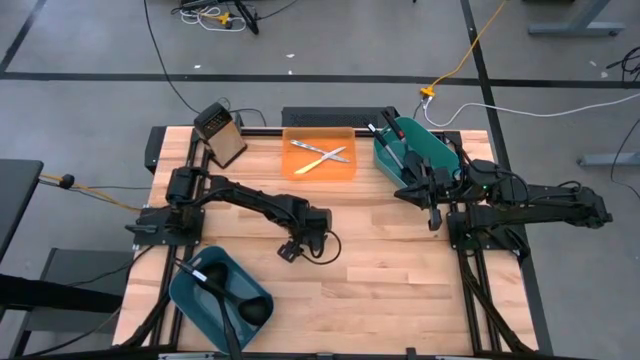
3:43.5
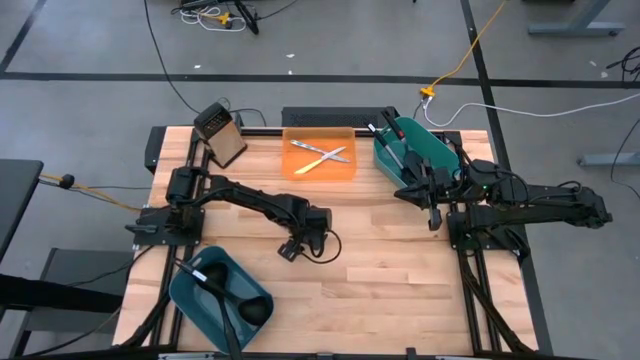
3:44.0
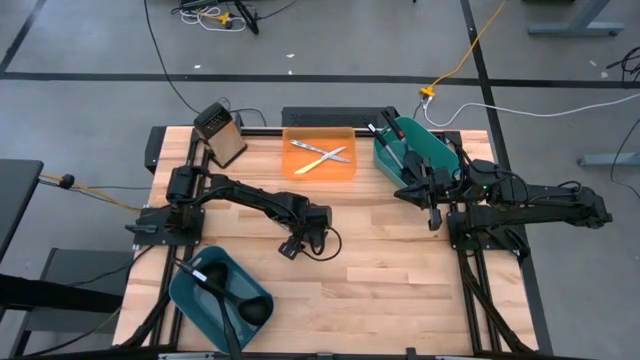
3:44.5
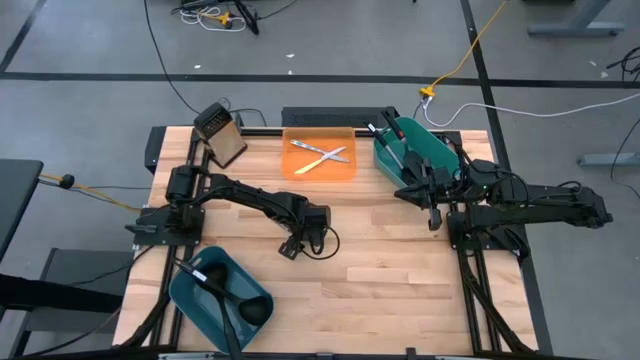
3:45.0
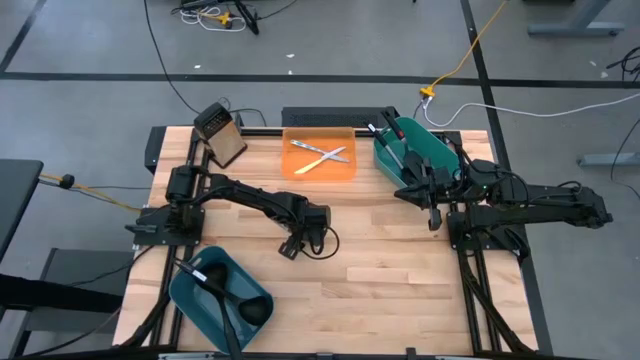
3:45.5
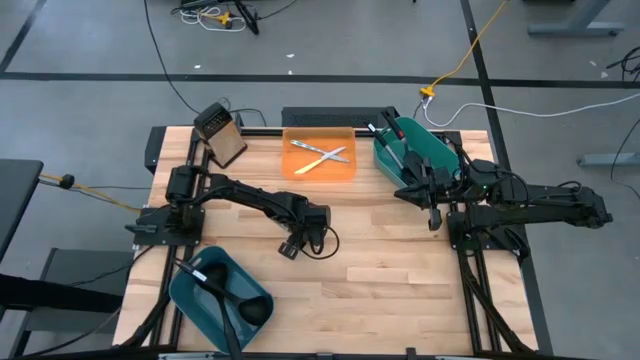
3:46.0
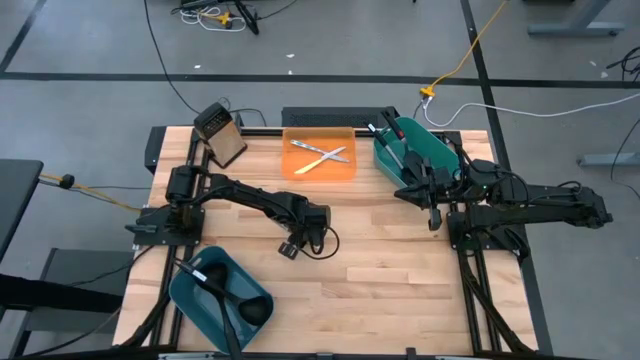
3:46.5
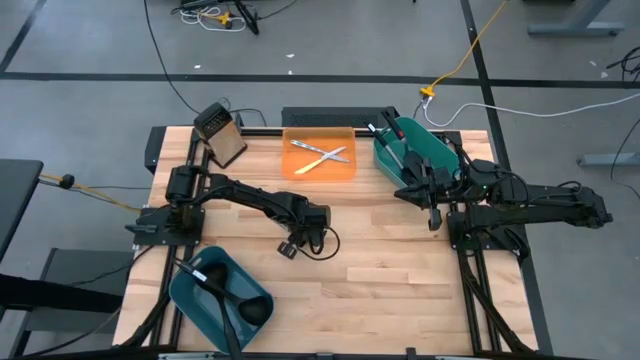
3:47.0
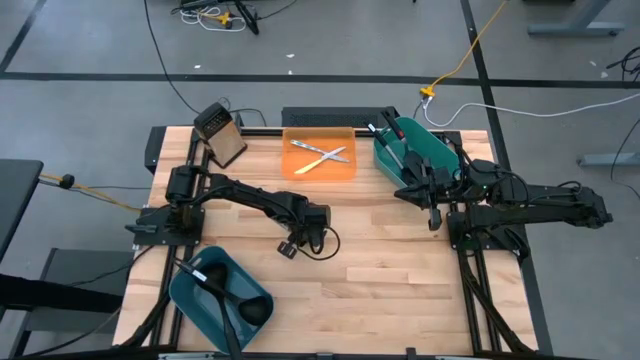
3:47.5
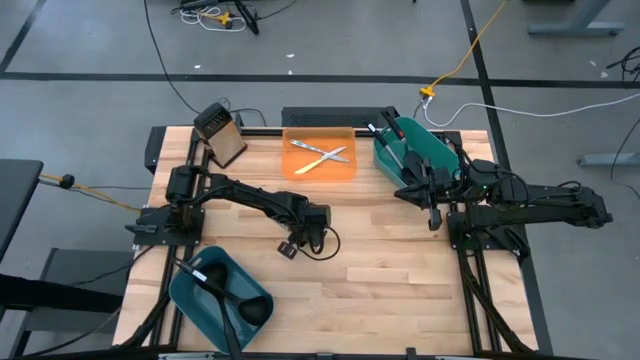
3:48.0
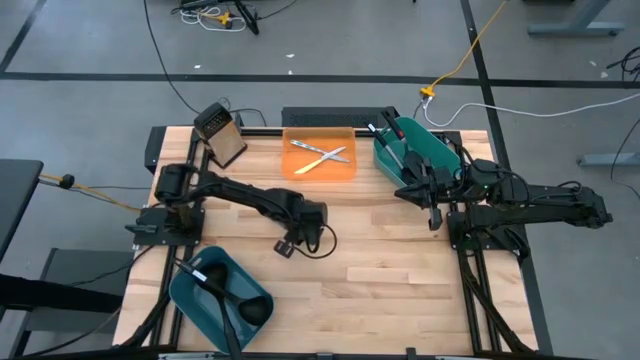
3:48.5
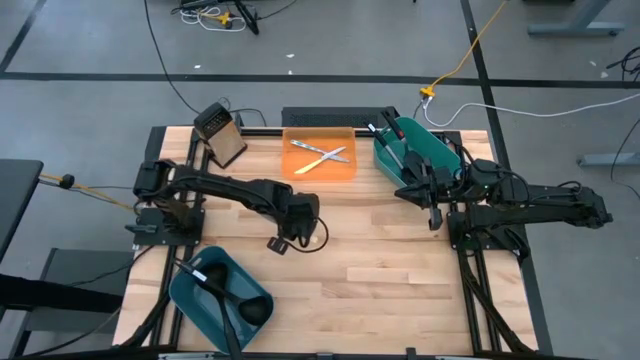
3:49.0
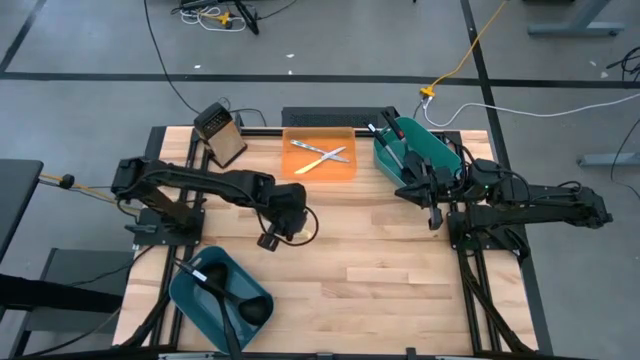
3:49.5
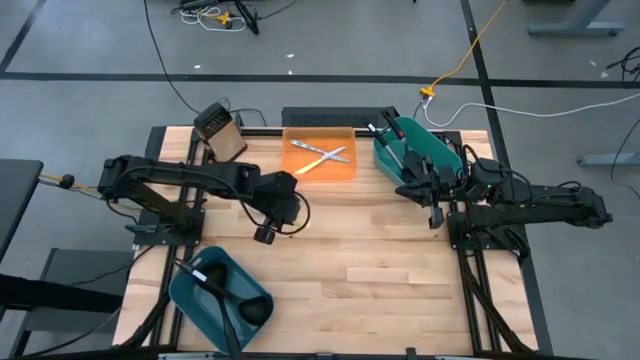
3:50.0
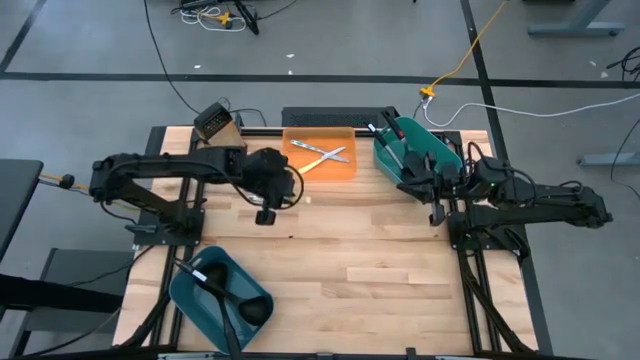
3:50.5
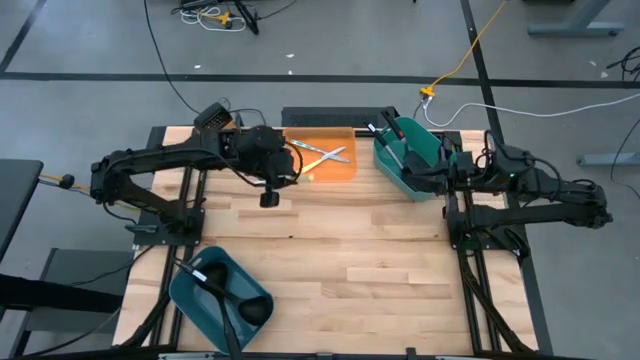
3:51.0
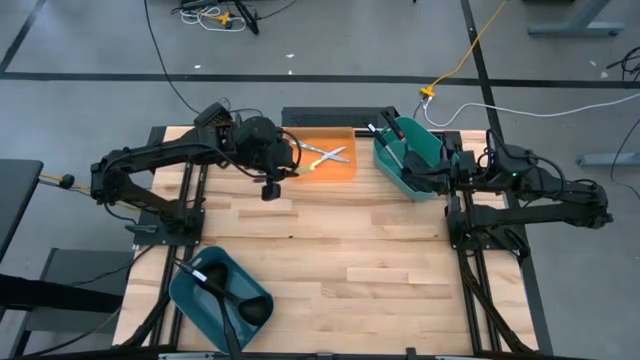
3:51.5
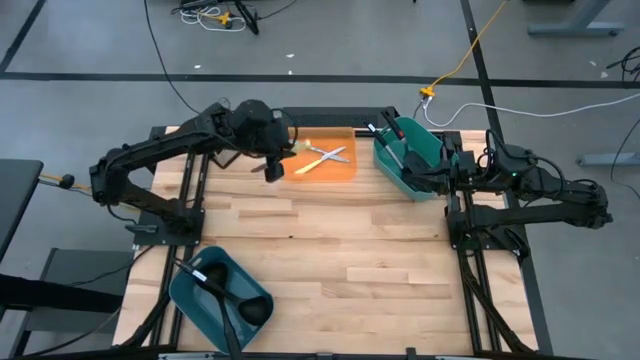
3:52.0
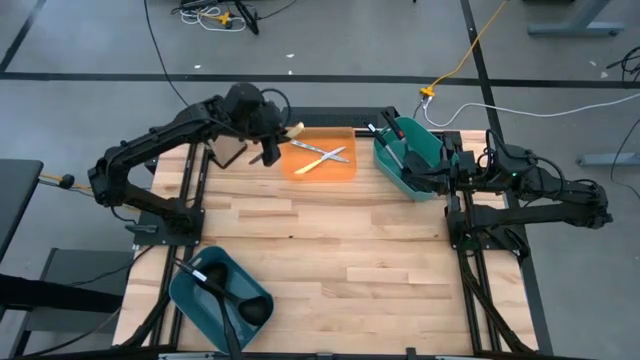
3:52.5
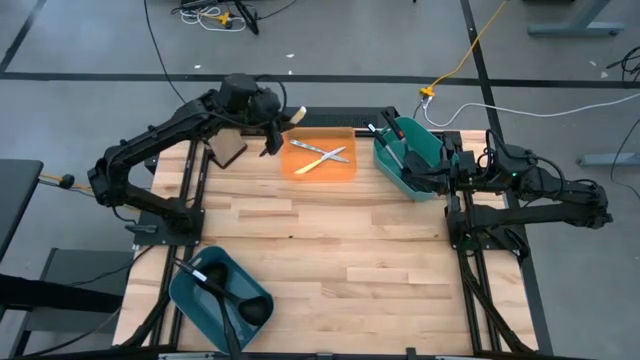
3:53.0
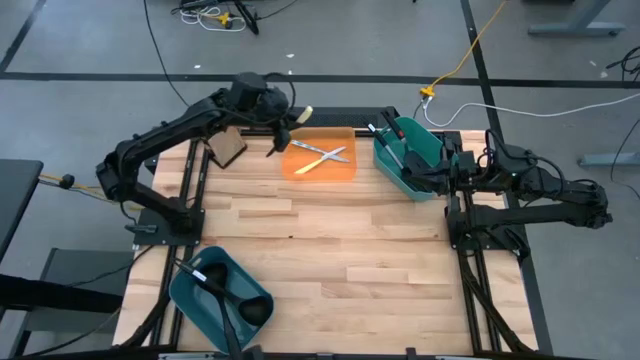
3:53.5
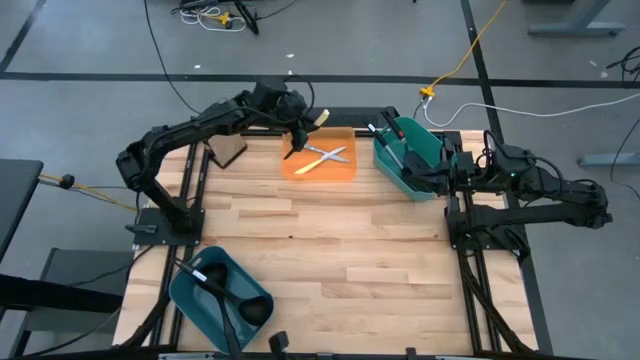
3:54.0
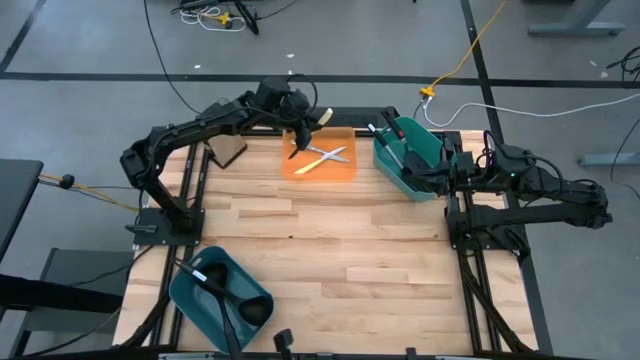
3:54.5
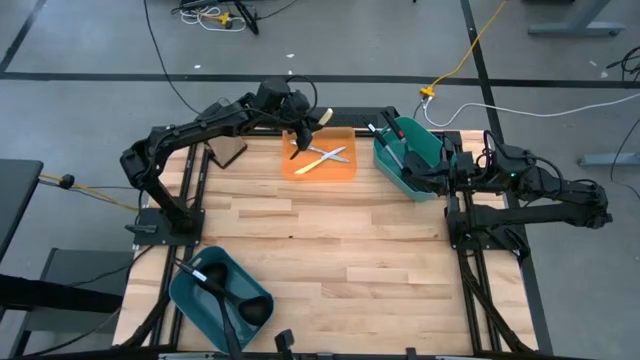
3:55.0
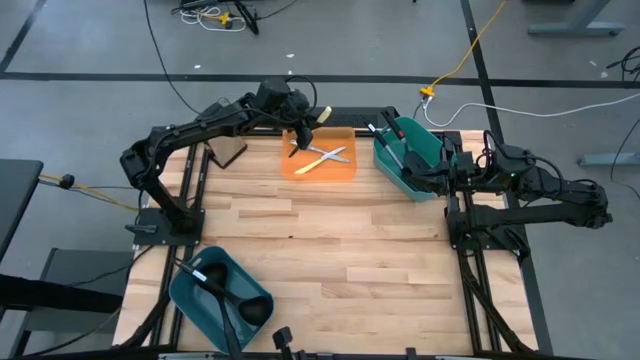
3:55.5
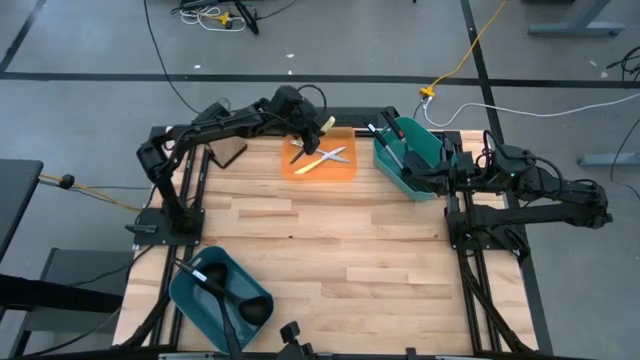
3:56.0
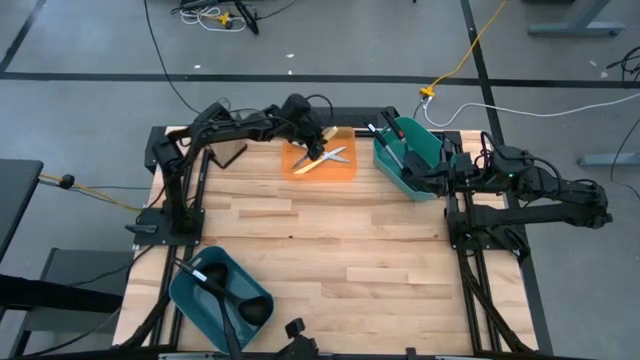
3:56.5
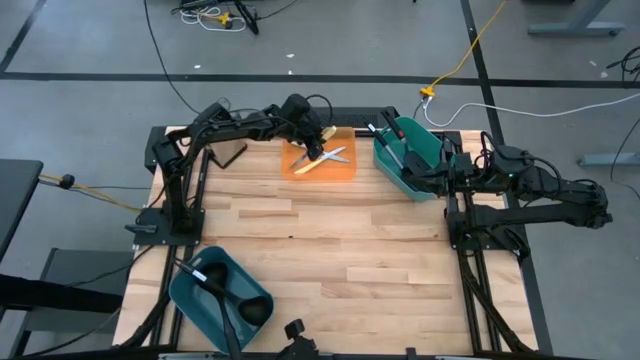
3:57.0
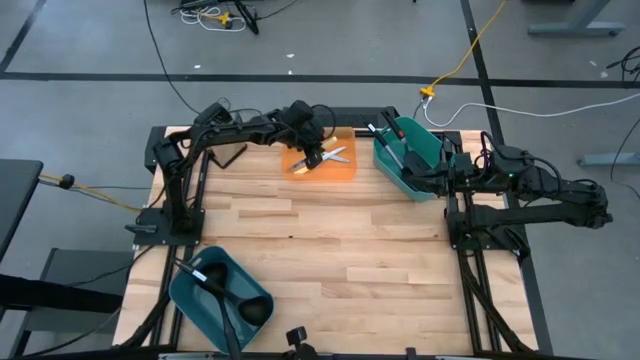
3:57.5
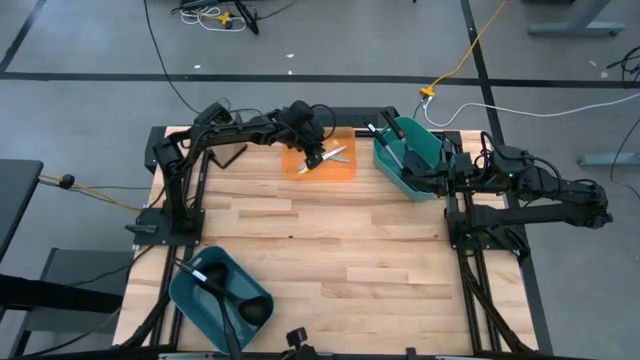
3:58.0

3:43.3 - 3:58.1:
Task: Pick & Place Kitchen Items
Put the yellow knife into the orange bin

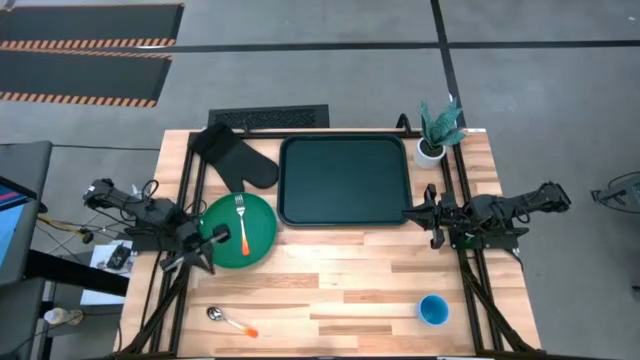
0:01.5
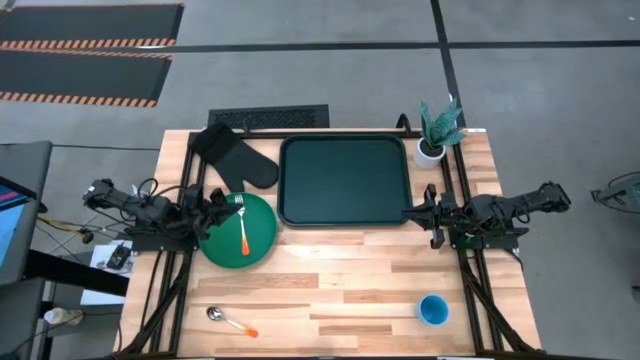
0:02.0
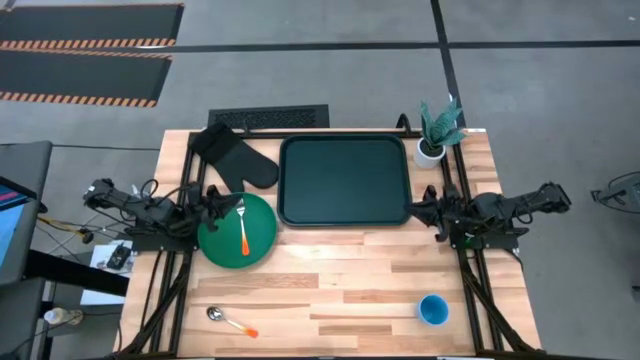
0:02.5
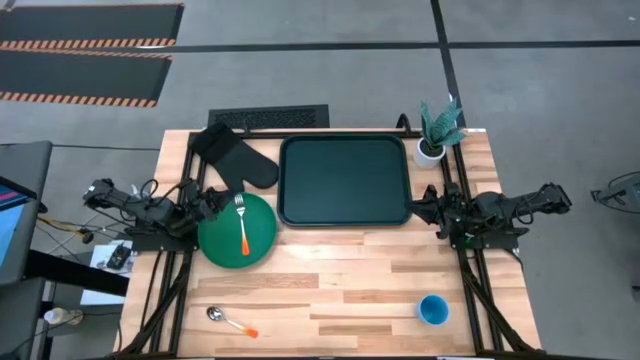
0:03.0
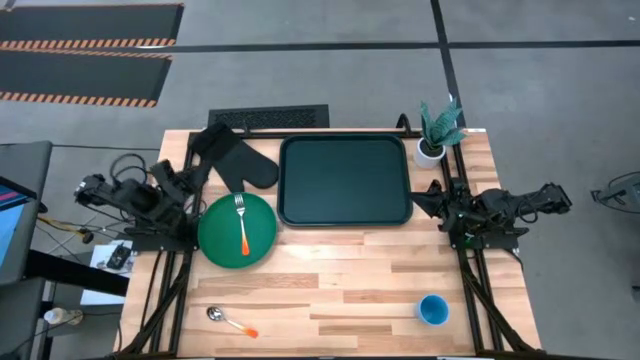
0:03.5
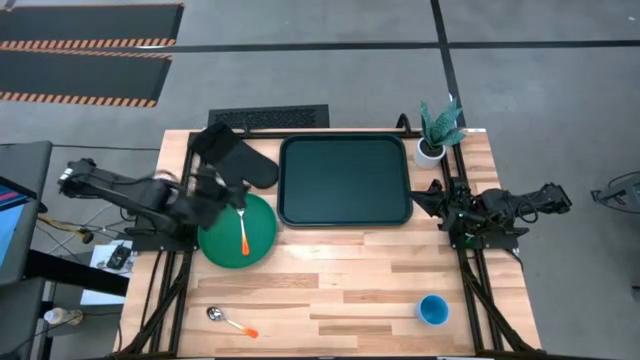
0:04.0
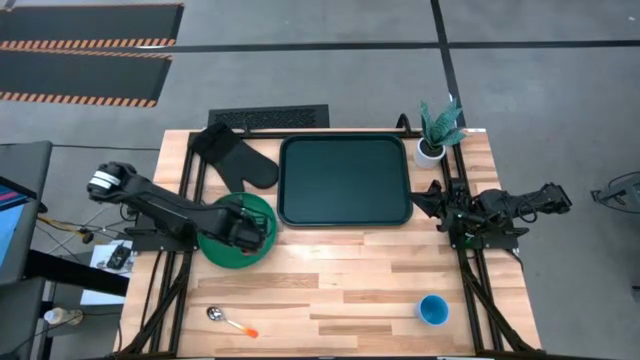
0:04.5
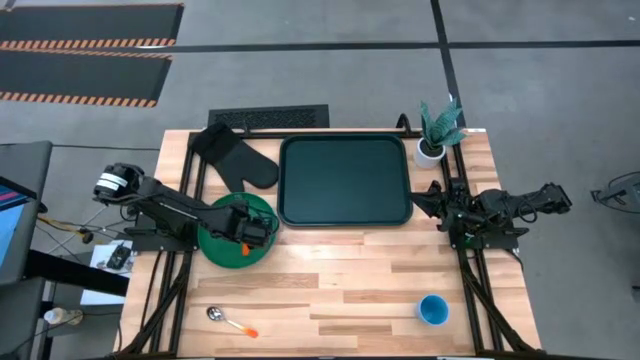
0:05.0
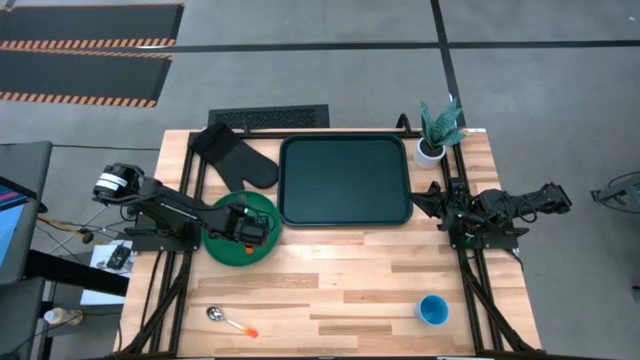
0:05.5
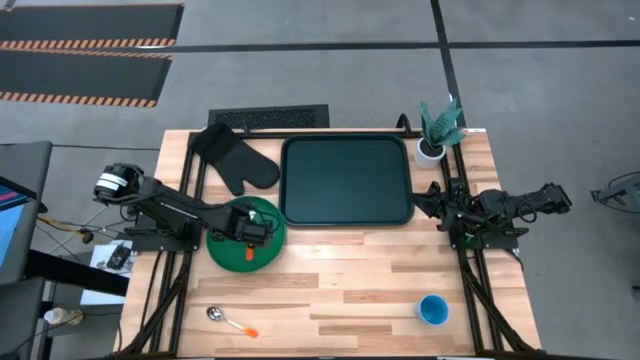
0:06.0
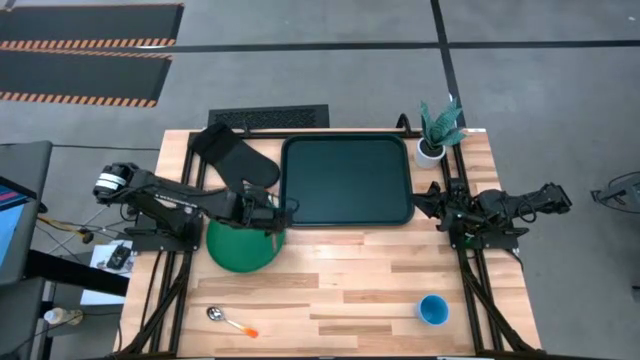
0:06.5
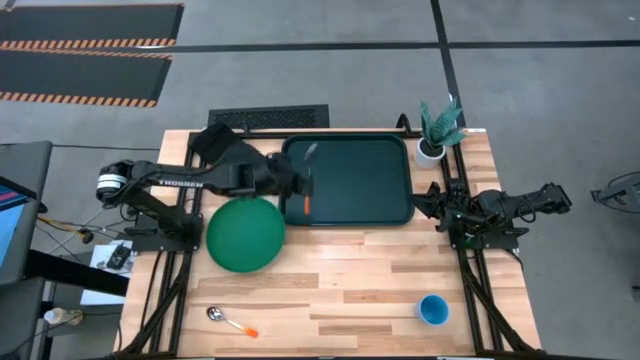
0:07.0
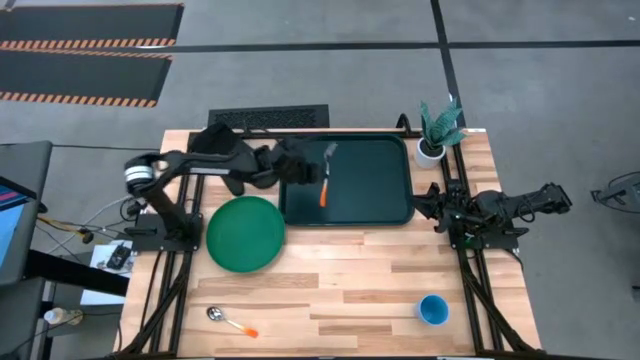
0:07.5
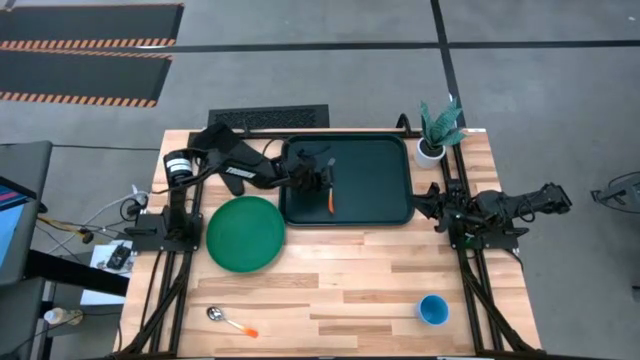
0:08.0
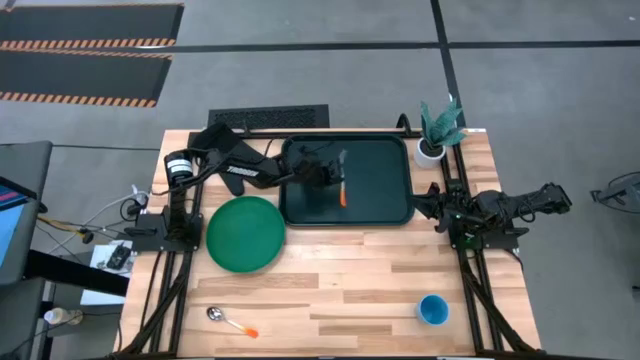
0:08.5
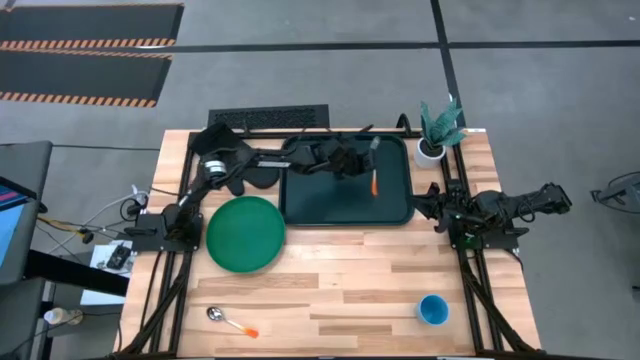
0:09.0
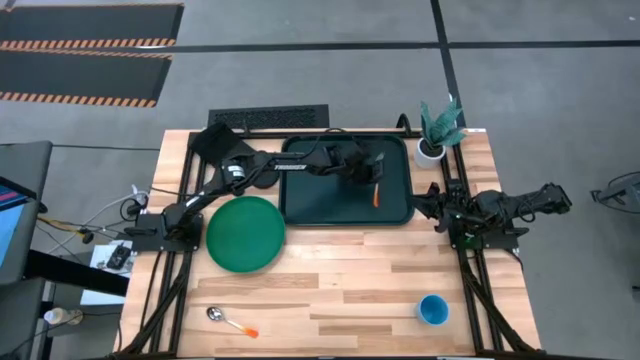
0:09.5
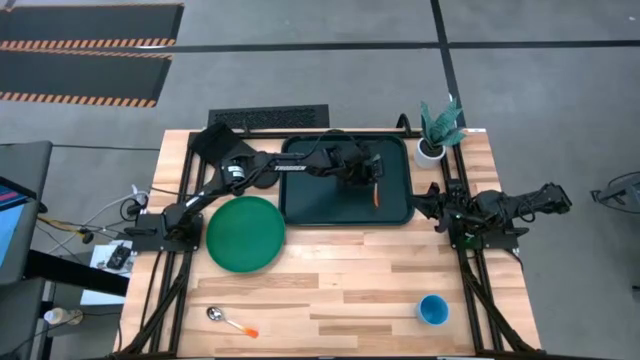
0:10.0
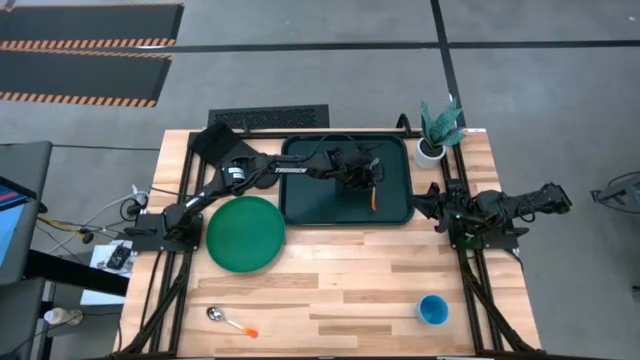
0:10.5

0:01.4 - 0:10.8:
Task: Pick and place plate/cup/fork/spoon on tray
Put the orange fork on the black tray
